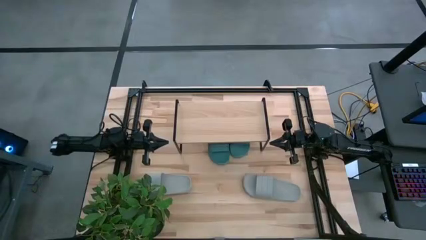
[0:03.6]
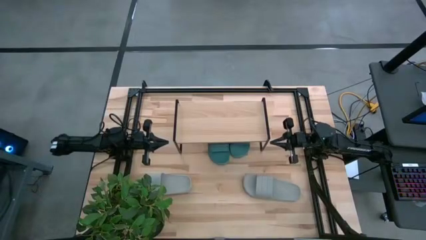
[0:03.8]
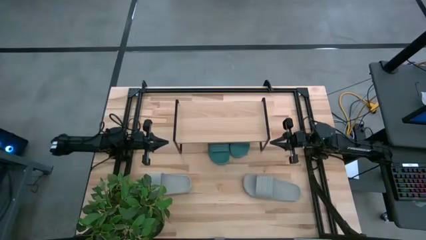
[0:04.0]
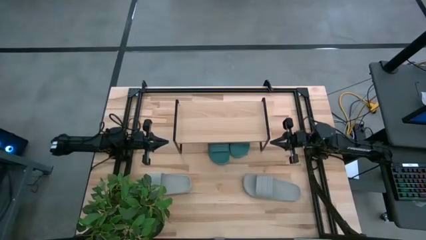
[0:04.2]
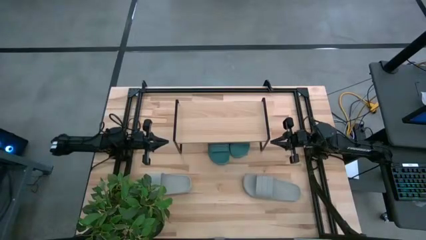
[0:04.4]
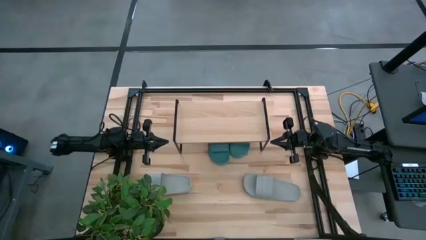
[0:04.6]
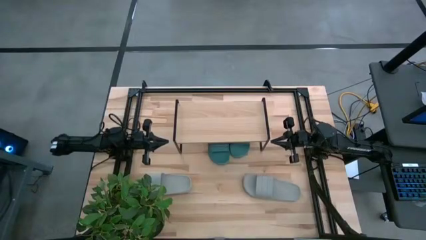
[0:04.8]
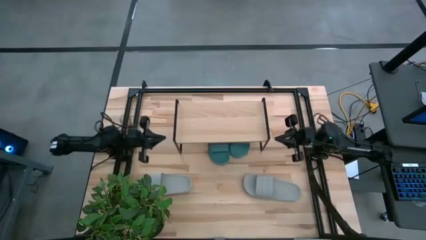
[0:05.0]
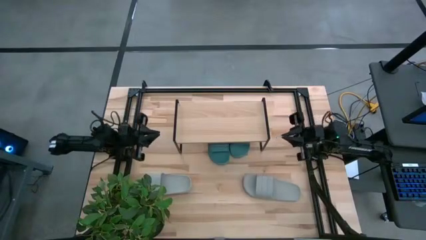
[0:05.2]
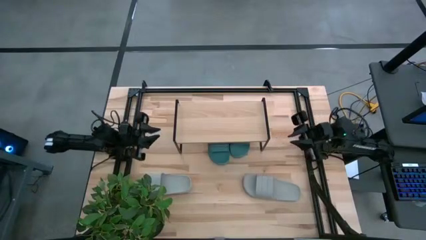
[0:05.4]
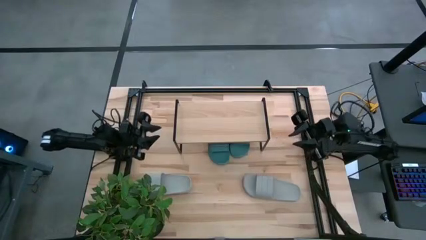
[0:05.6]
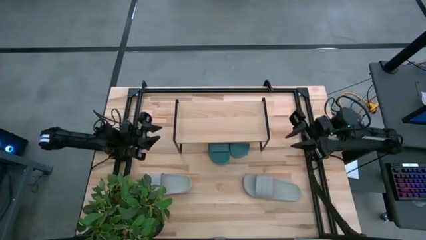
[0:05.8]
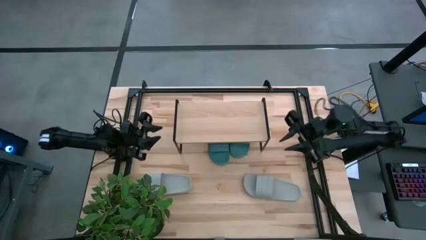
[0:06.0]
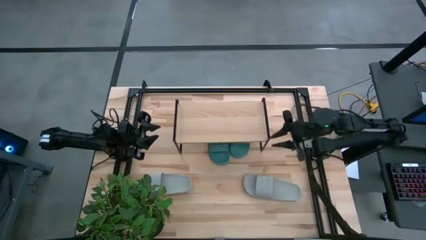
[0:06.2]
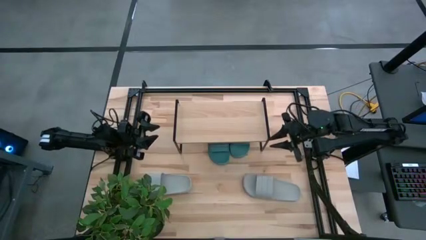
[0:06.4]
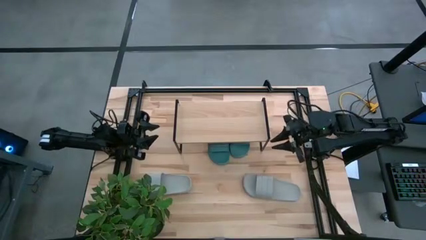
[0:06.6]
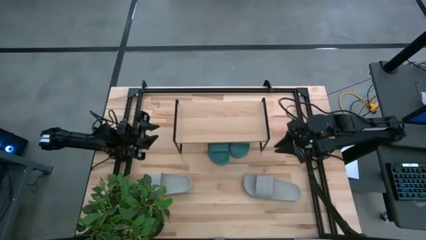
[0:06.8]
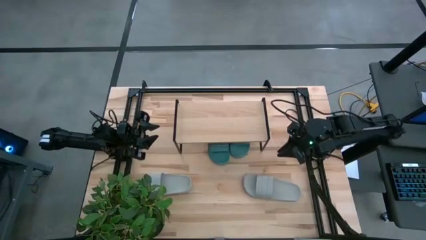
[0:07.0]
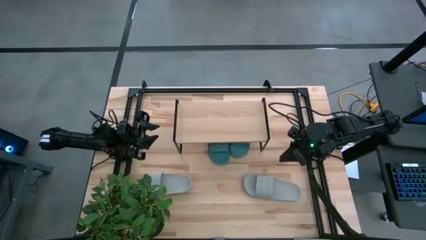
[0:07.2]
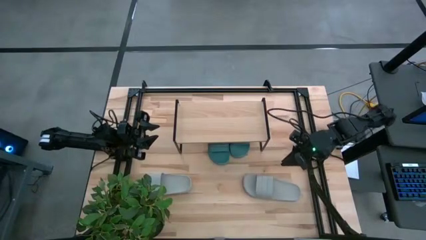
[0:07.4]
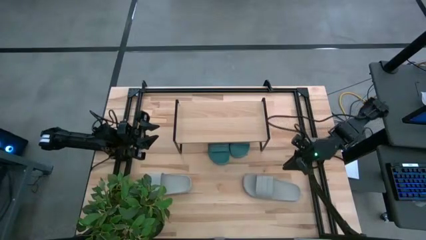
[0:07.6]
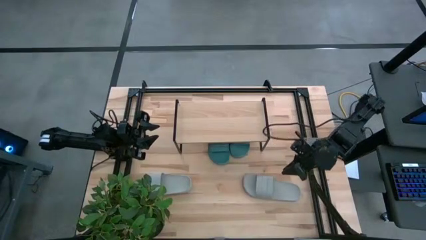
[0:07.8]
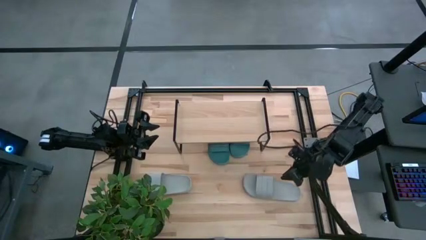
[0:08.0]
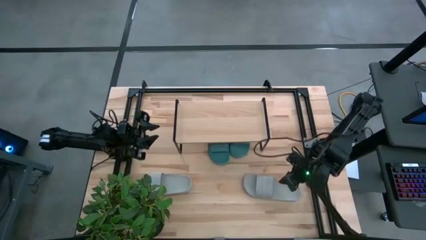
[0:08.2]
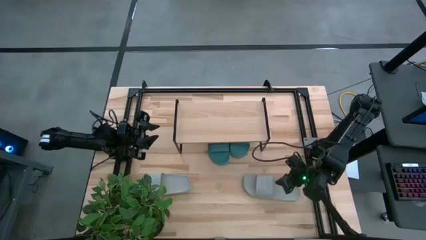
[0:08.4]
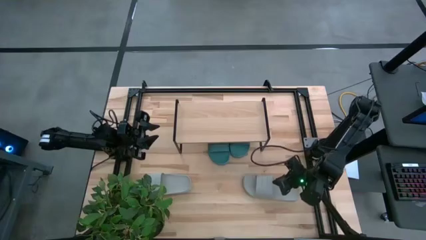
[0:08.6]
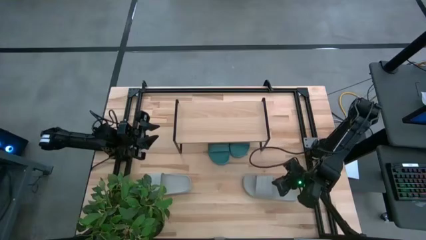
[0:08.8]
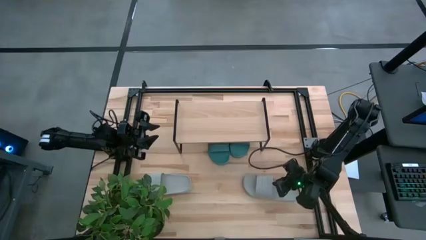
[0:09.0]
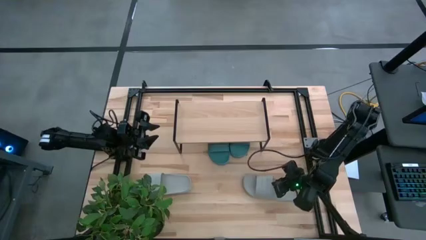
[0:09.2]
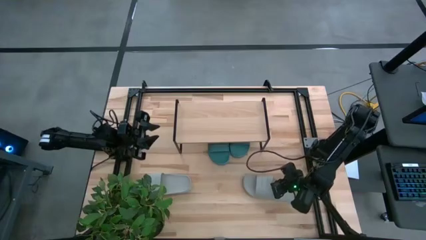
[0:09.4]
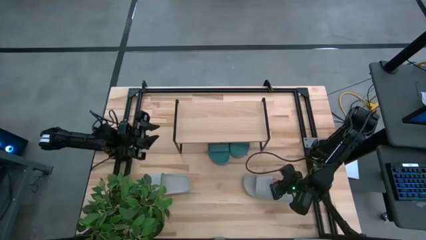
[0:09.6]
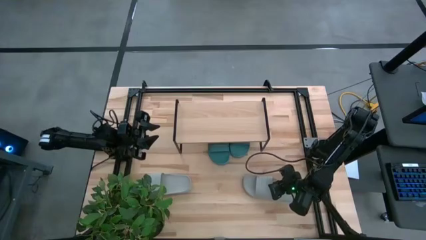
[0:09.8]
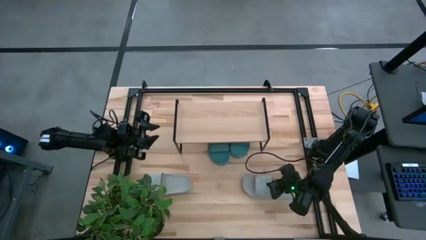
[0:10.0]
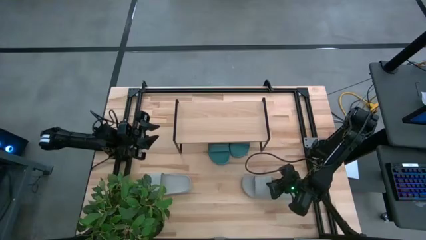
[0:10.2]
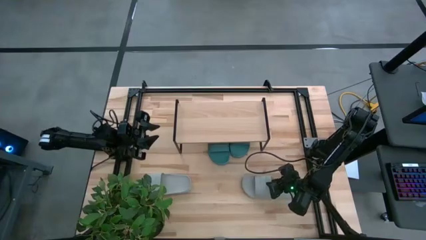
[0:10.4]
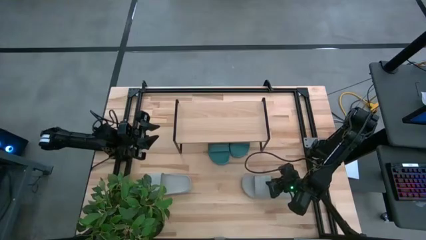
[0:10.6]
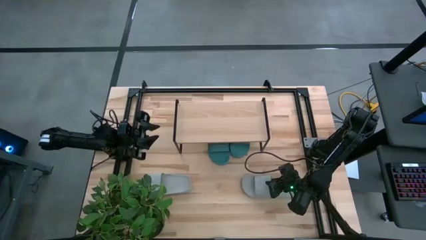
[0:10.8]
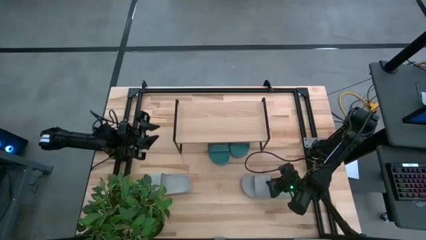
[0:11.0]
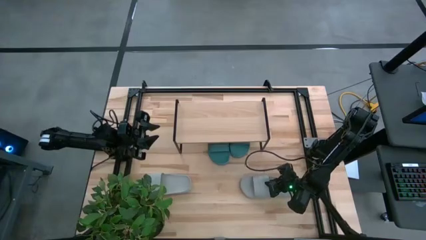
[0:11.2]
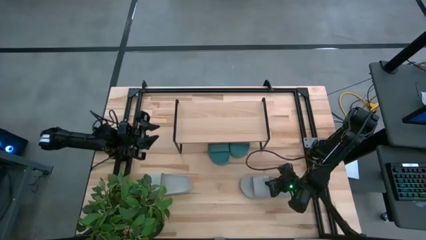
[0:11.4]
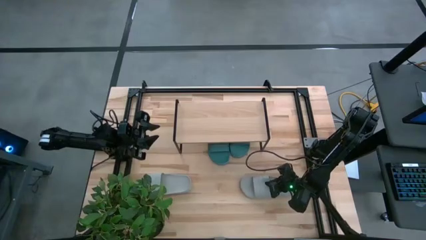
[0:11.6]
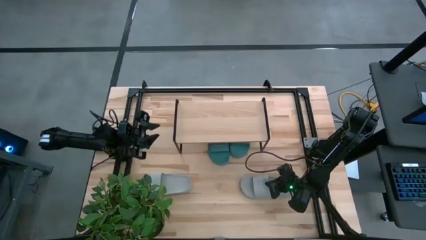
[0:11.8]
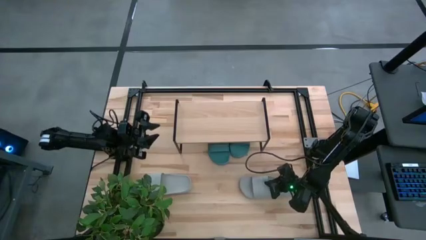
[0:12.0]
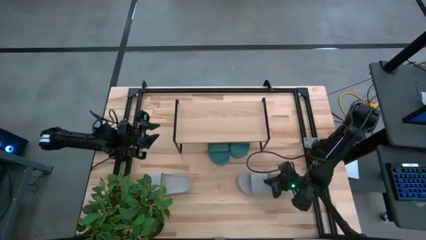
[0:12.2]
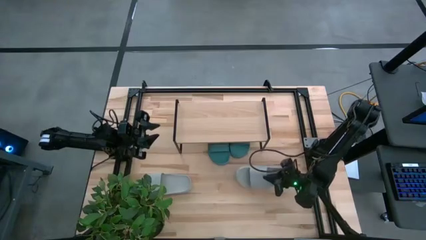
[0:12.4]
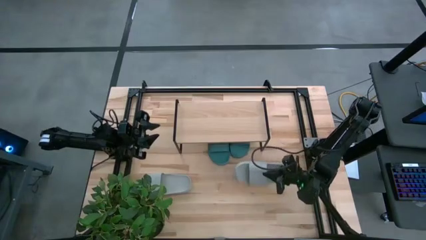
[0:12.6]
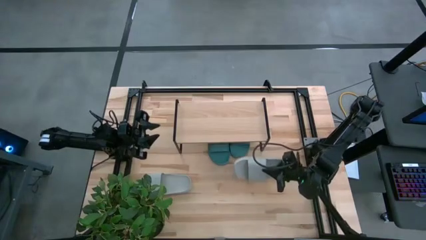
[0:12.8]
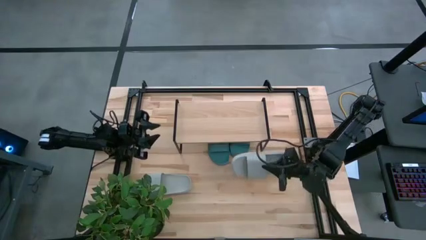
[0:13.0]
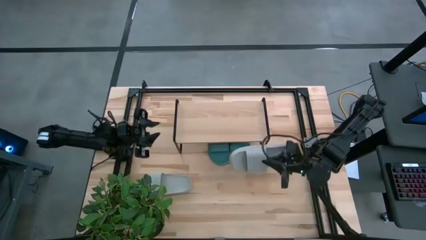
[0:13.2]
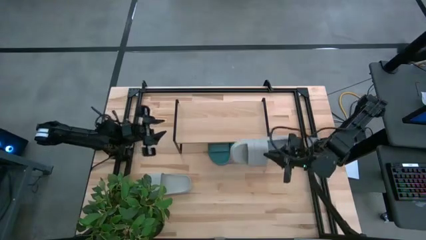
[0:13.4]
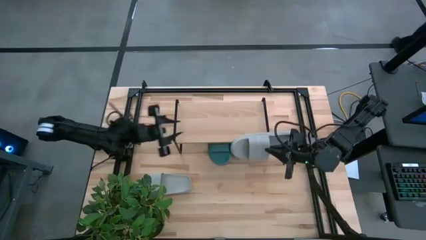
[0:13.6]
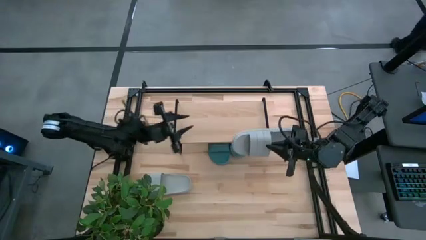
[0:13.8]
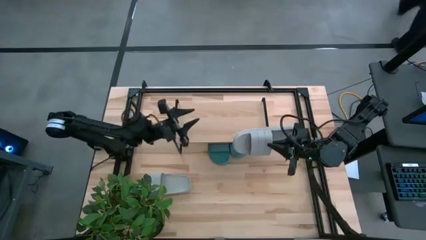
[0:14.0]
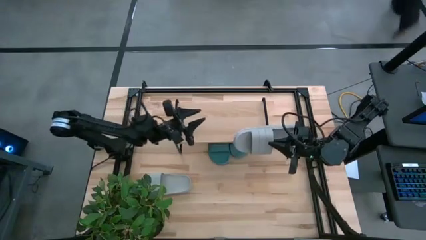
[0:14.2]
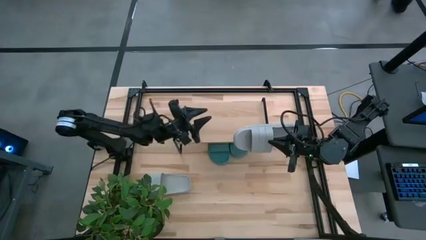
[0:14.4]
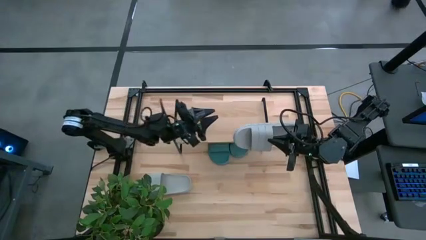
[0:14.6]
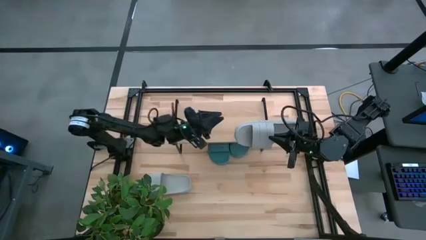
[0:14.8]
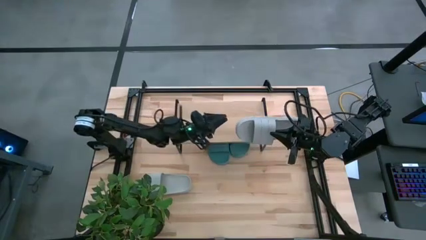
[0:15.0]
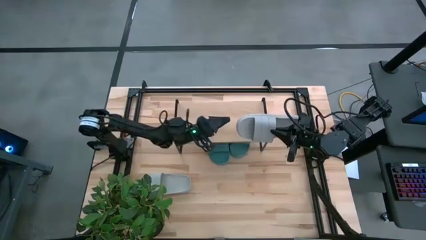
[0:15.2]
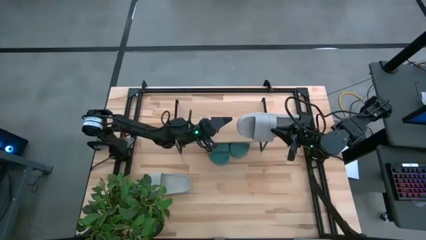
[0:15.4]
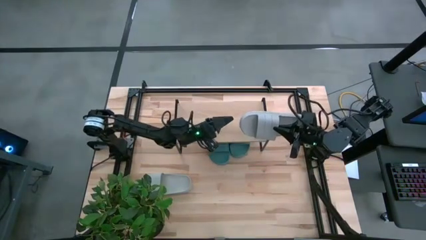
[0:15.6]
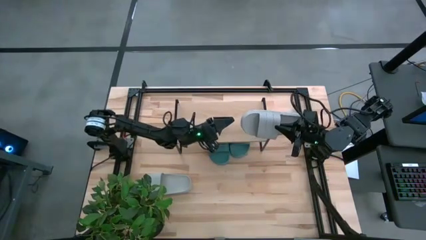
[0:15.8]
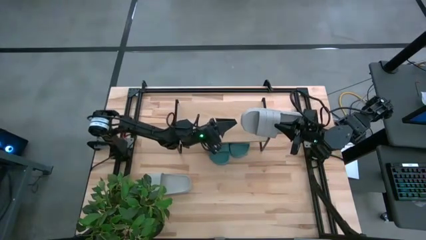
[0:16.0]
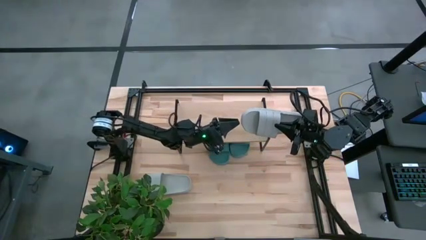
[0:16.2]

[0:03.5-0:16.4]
Task: Pick and place slides into the shelf
Put the right gray slides on the shelf

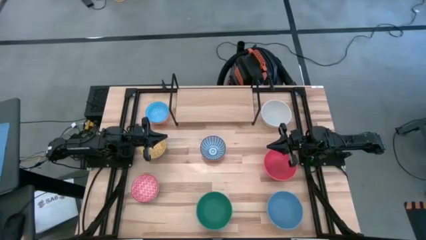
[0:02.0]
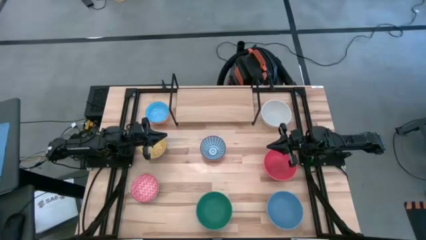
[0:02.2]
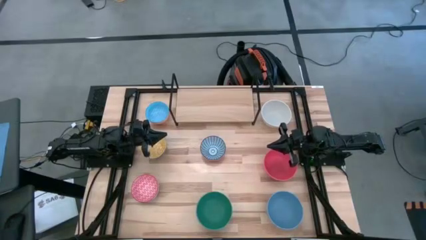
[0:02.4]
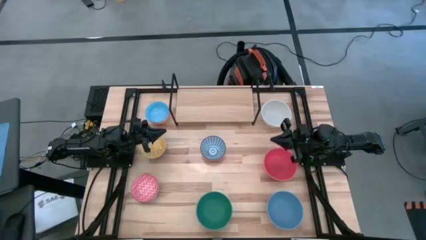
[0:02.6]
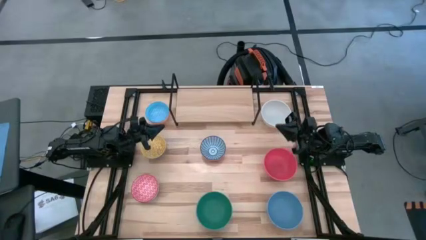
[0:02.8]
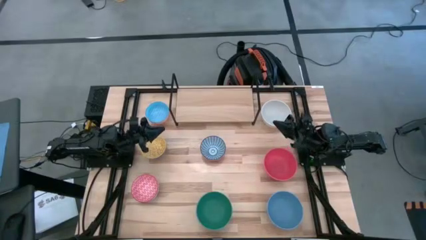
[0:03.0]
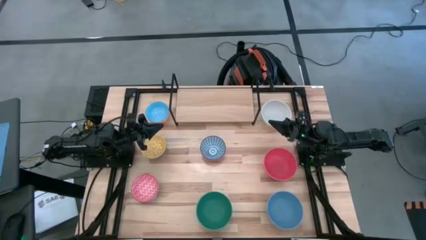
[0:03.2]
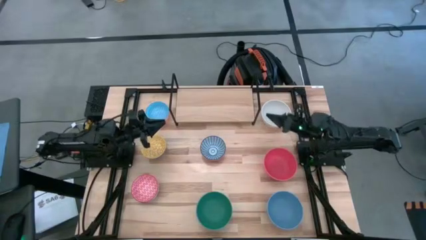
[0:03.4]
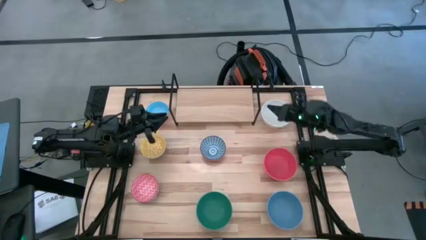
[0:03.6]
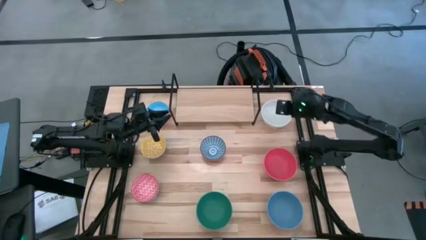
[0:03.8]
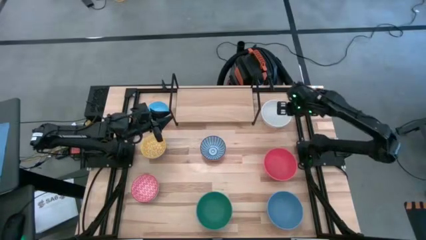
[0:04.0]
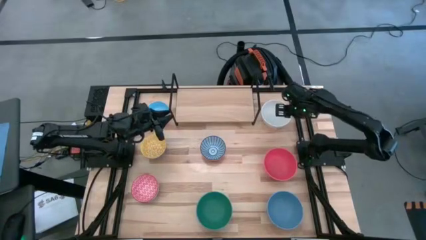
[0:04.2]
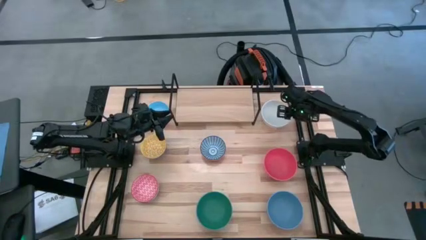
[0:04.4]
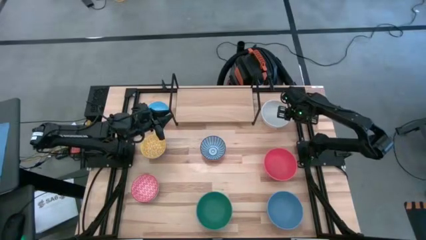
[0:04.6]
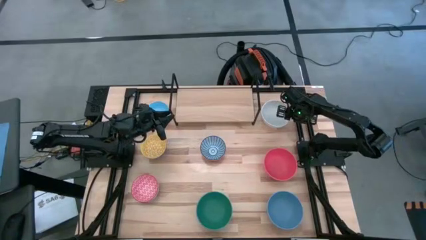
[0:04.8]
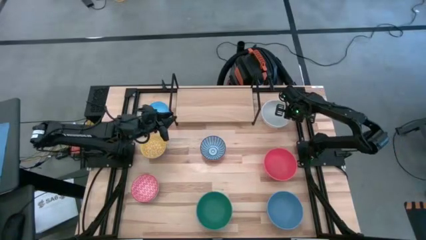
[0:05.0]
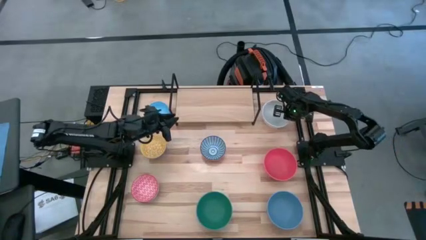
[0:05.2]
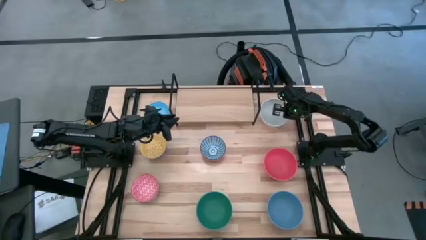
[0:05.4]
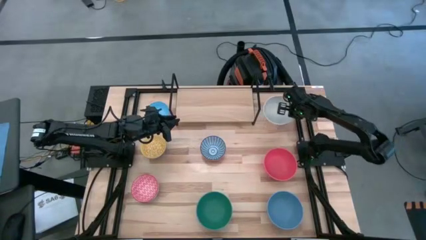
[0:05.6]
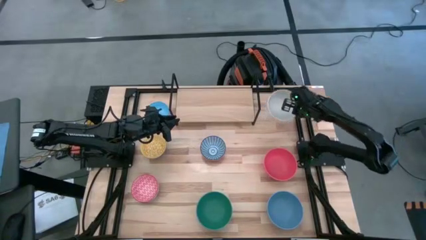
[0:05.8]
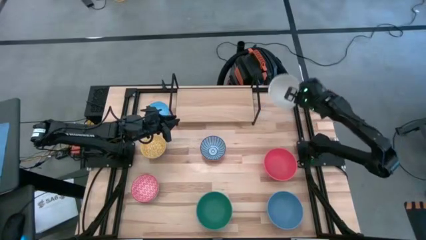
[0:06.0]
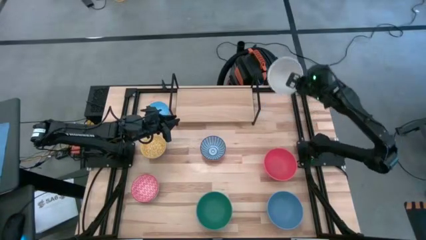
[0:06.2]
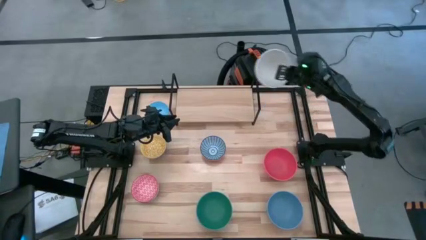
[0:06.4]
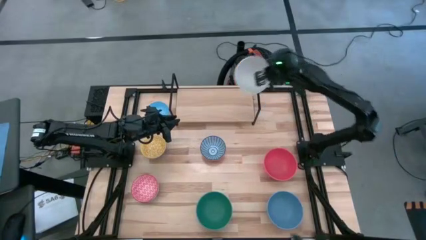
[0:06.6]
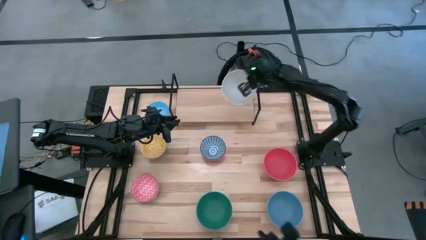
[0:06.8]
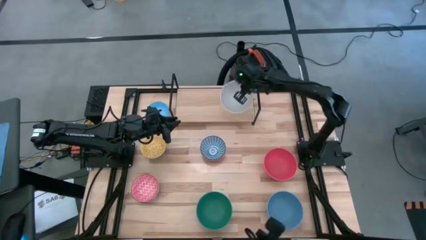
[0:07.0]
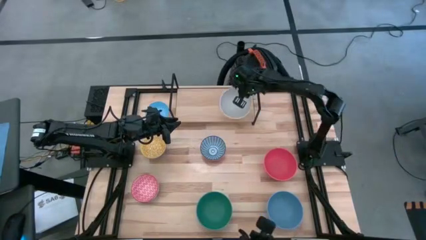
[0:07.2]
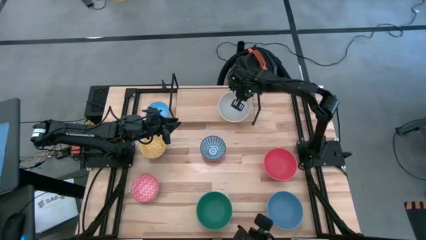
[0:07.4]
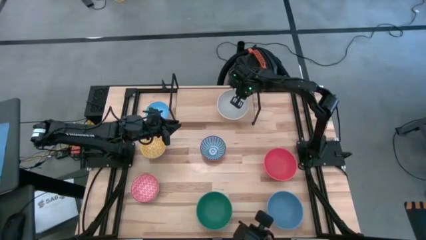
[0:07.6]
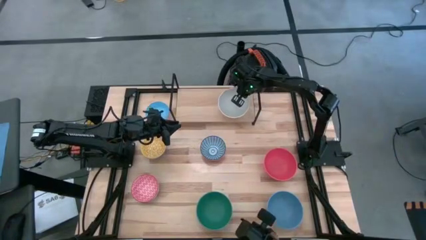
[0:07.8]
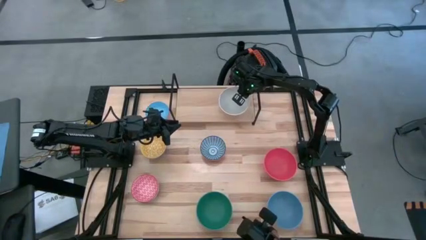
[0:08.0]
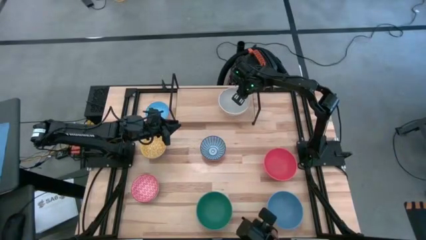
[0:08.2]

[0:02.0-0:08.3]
Task: Place and stack bowls onto a shelf
Put the big gray bowl on the shelf
